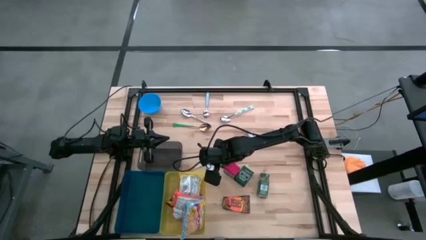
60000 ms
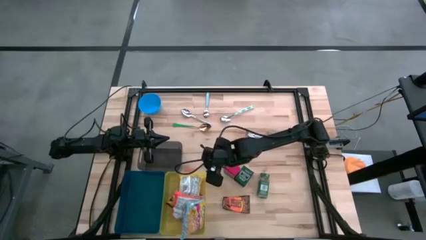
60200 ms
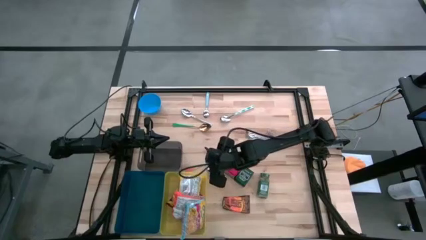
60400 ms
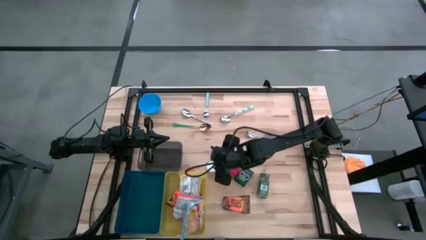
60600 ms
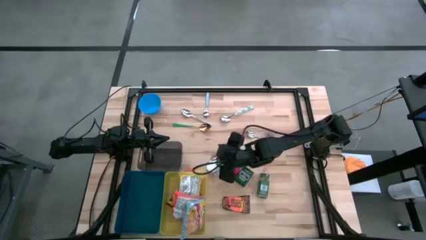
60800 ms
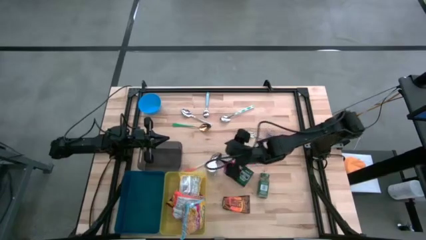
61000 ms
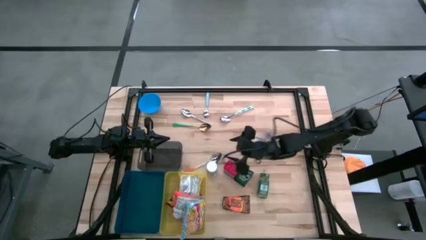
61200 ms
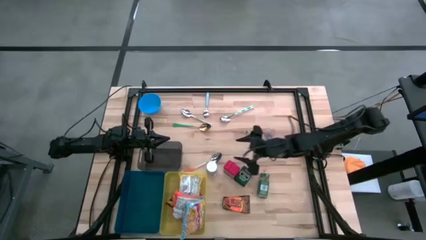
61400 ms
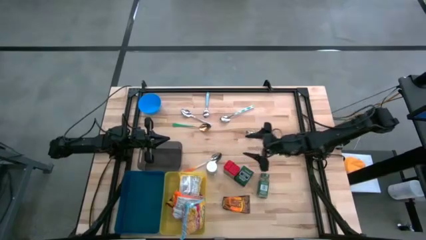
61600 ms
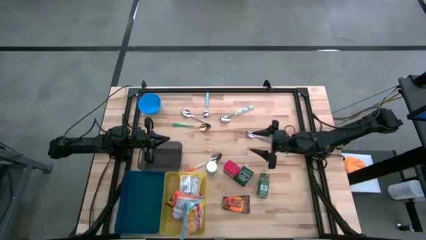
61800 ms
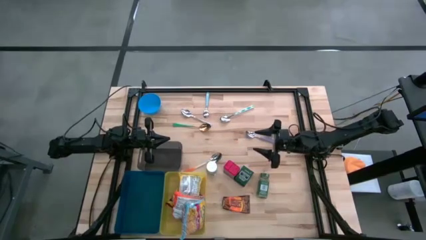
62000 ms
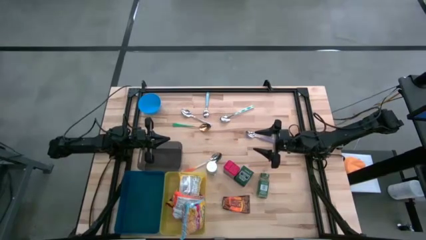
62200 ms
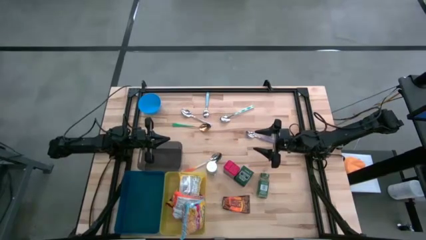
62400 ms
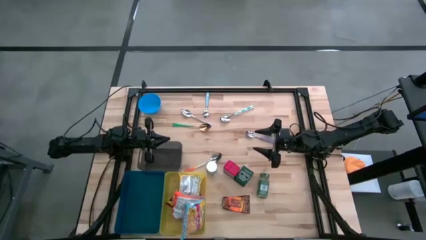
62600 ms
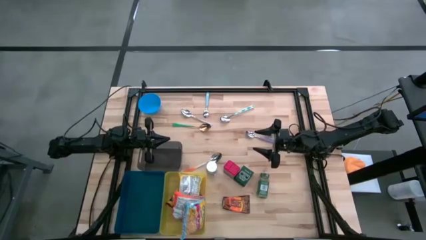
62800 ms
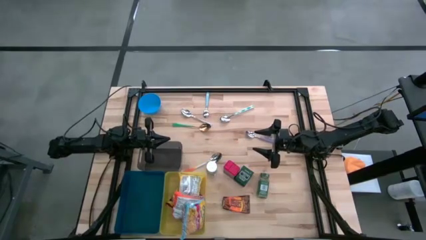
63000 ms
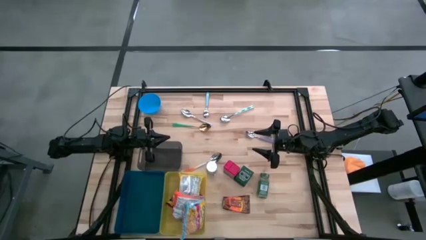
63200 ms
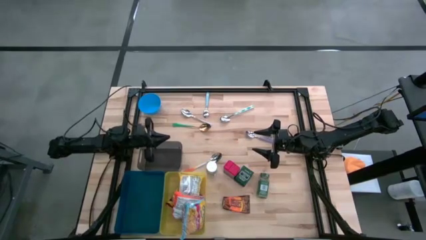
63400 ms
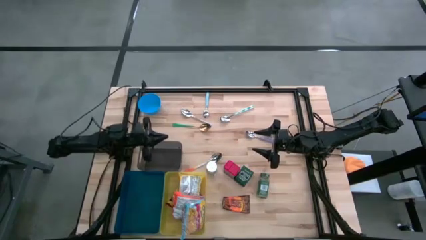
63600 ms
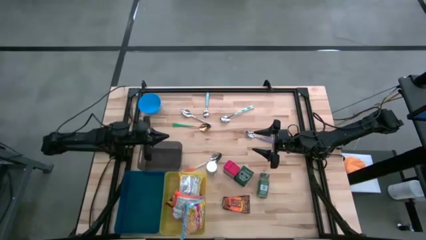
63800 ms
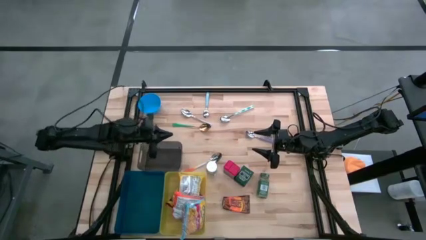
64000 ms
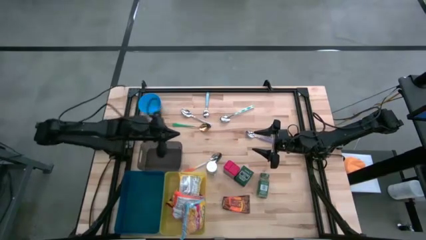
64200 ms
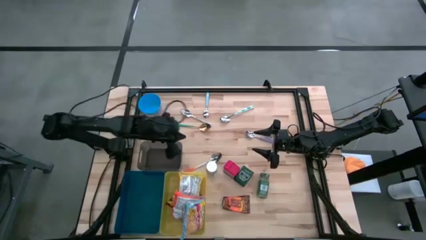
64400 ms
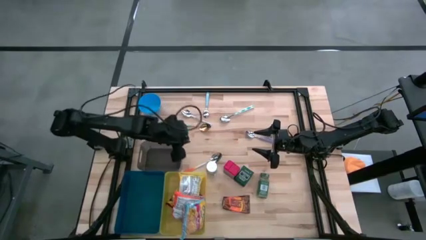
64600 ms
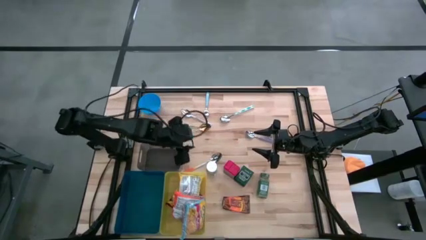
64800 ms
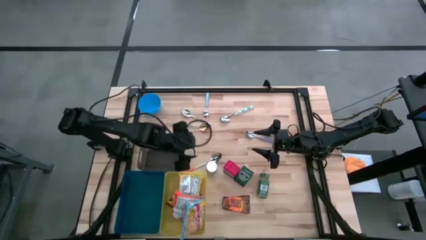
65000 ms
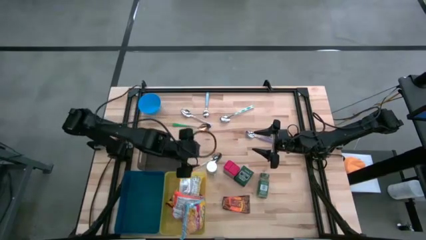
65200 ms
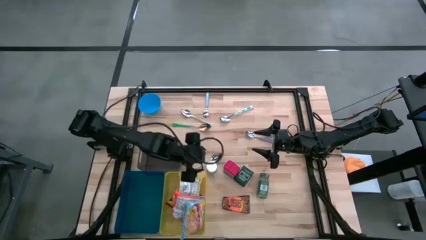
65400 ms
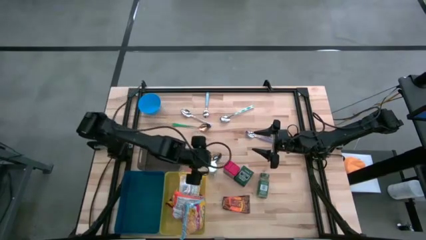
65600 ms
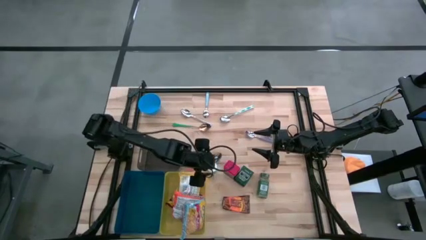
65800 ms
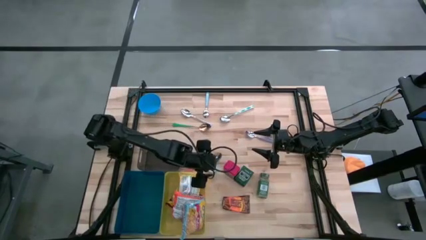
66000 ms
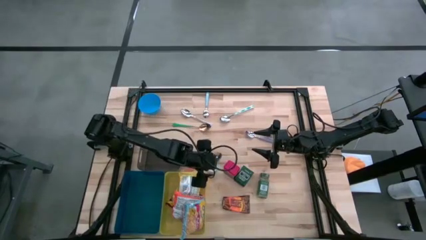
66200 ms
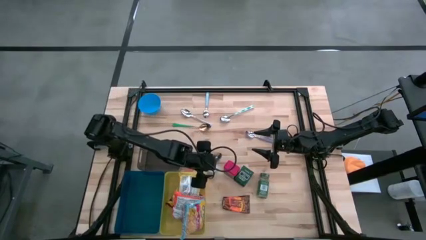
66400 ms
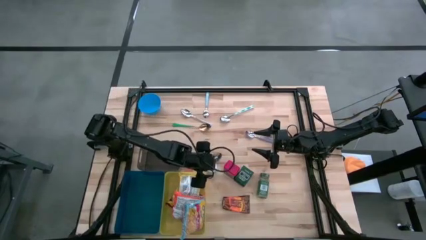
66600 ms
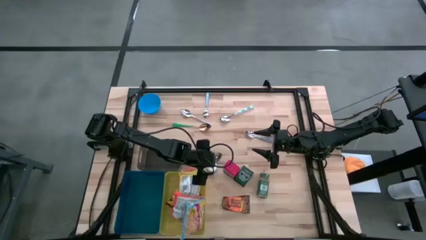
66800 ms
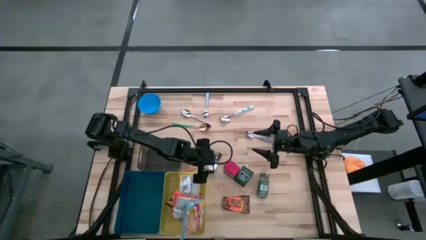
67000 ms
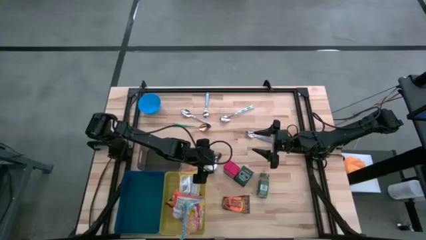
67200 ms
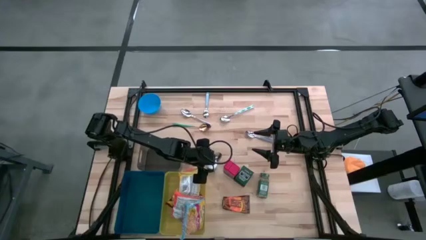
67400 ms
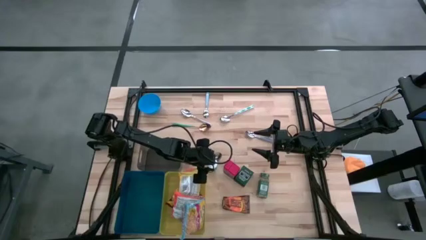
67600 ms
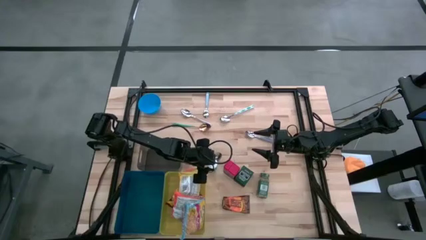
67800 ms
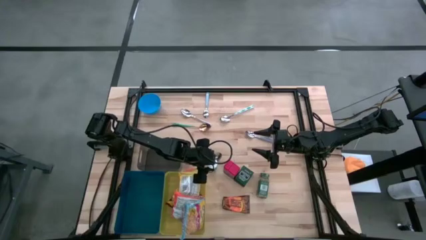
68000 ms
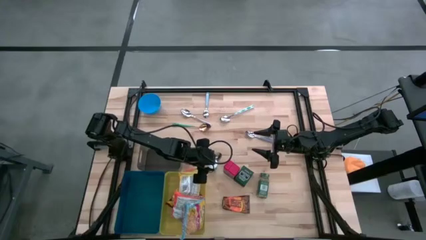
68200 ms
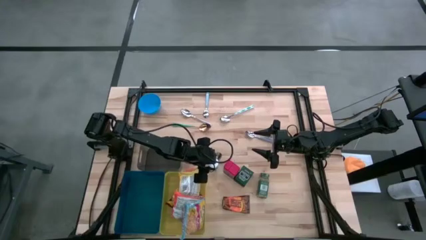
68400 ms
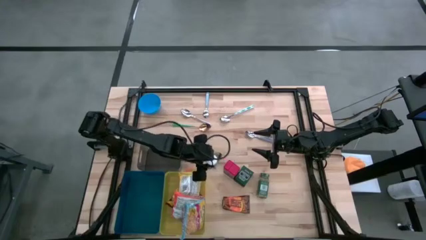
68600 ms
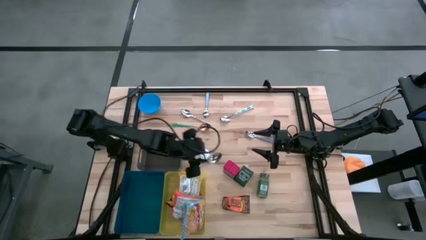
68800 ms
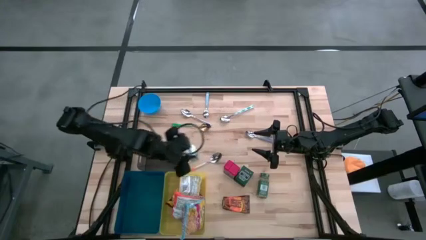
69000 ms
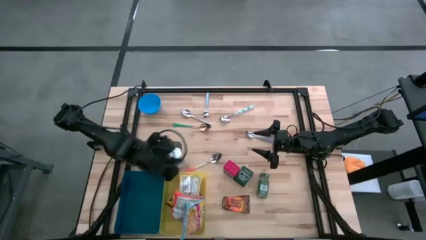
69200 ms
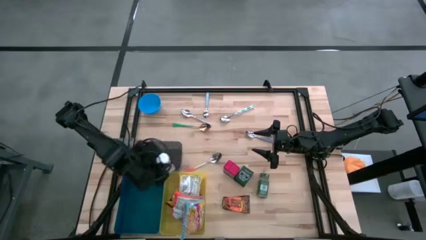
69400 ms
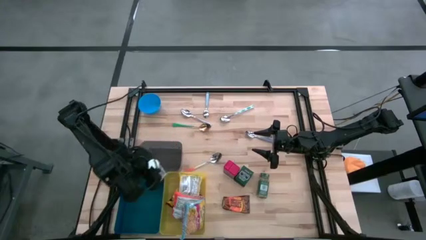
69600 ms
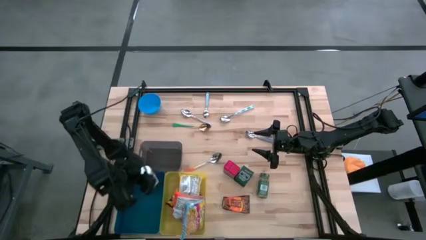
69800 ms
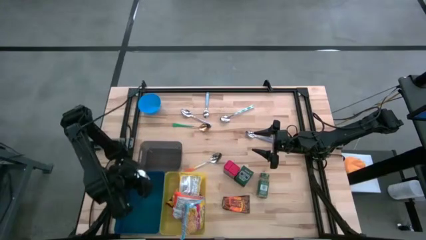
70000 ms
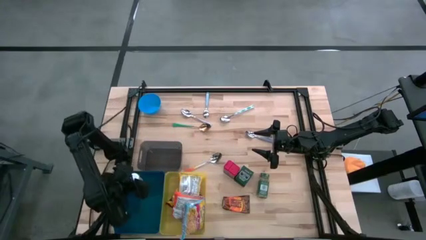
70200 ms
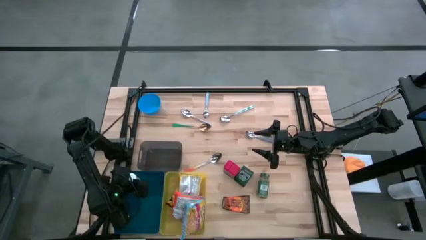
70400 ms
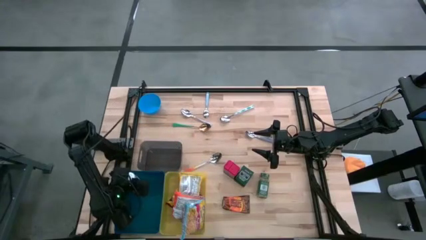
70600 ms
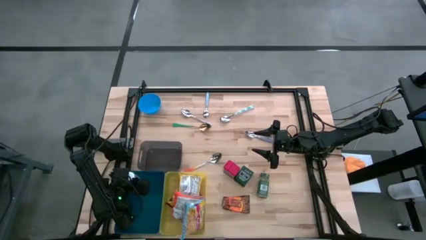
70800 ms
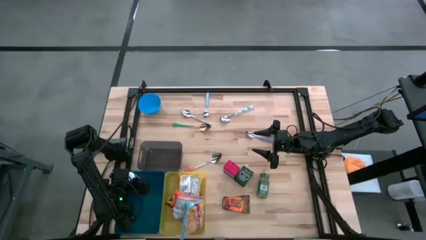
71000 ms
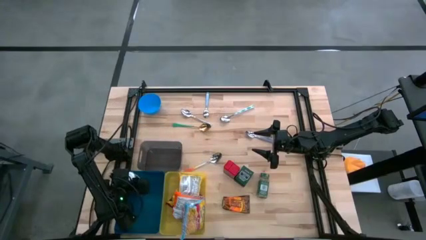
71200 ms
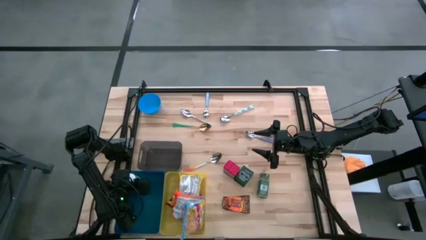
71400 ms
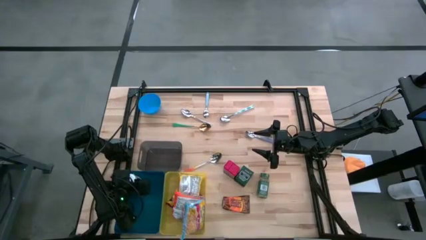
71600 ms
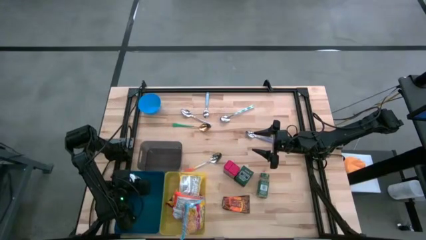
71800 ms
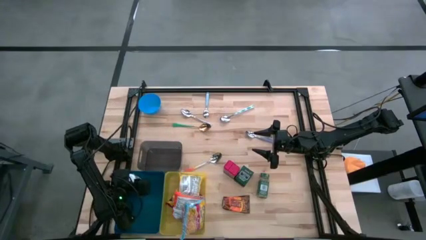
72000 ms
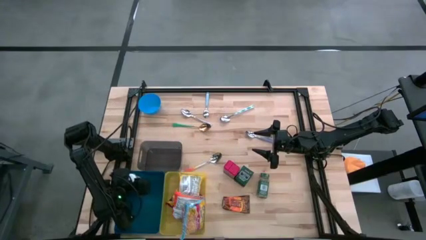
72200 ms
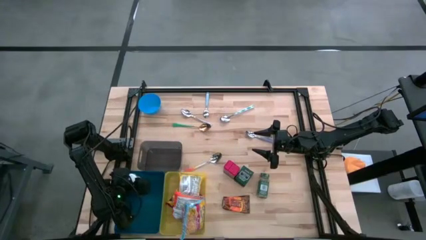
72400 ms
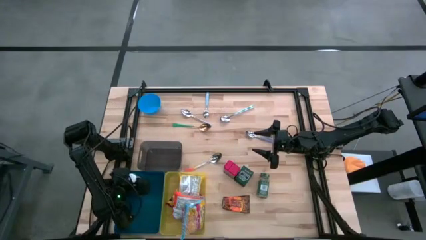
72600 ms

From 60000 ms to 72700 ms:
Put the white seasoning bottle into the blue bin

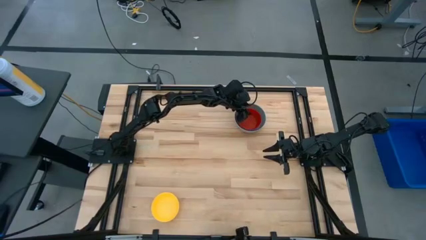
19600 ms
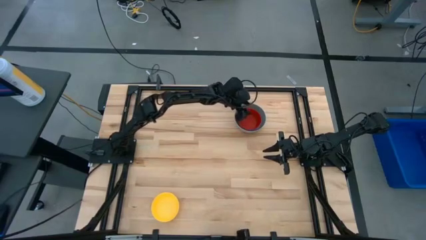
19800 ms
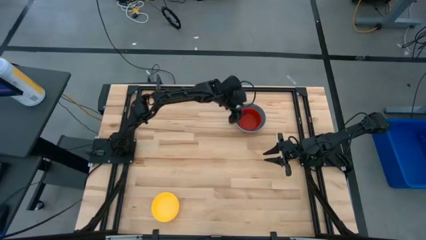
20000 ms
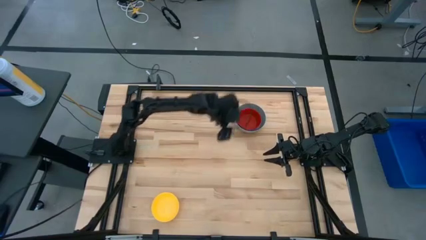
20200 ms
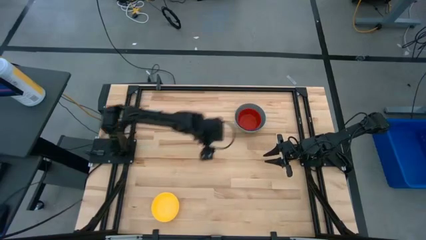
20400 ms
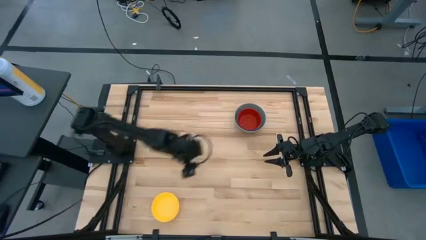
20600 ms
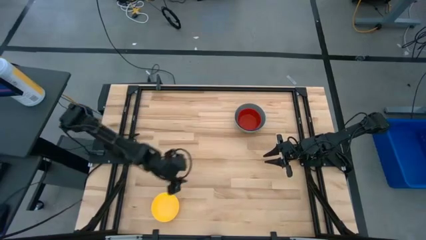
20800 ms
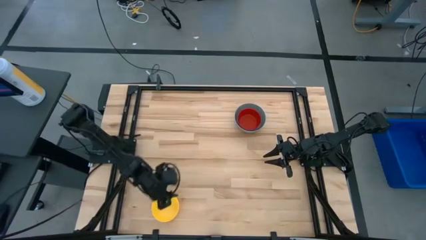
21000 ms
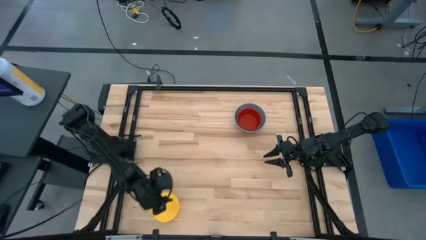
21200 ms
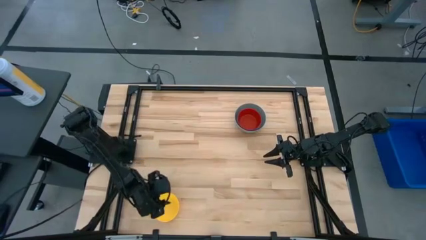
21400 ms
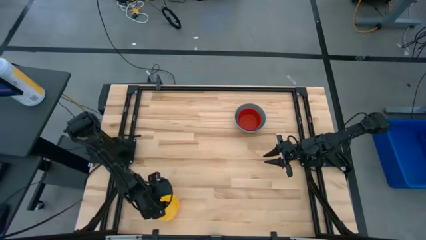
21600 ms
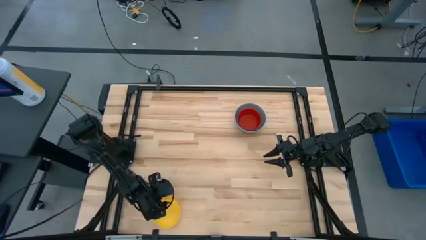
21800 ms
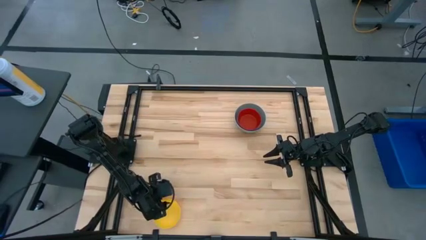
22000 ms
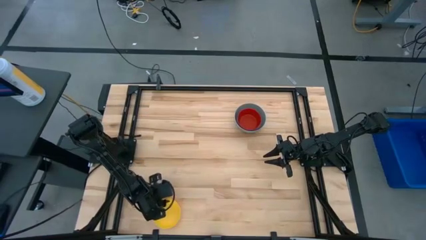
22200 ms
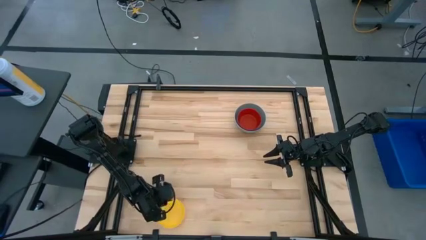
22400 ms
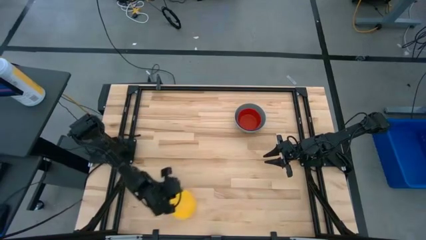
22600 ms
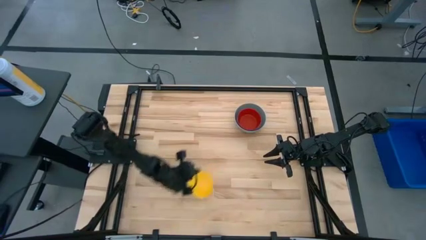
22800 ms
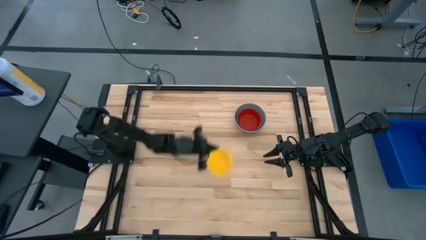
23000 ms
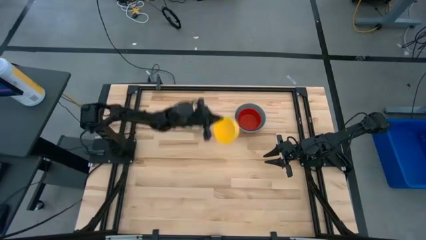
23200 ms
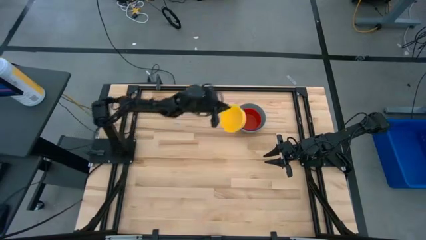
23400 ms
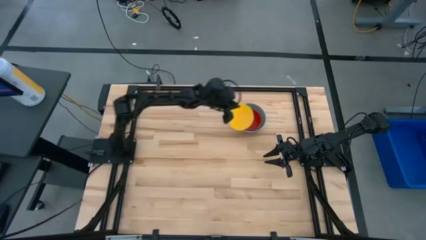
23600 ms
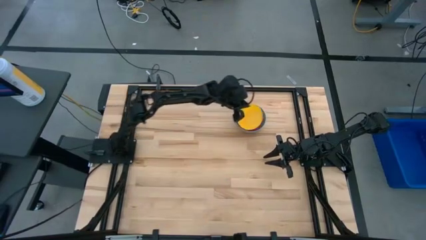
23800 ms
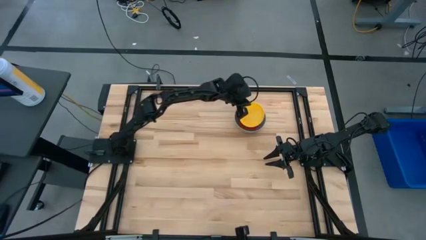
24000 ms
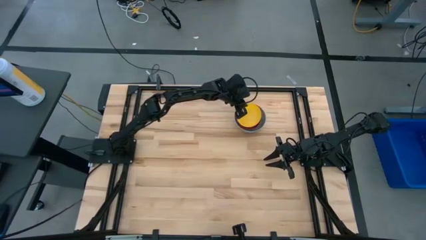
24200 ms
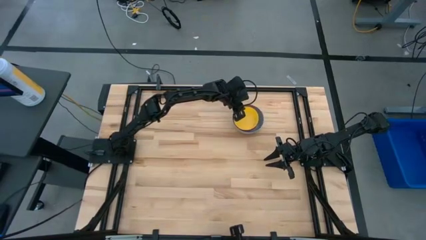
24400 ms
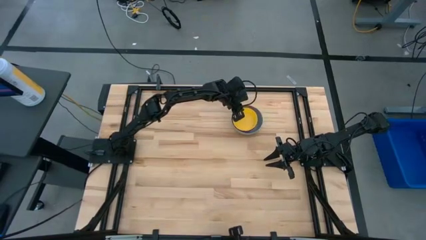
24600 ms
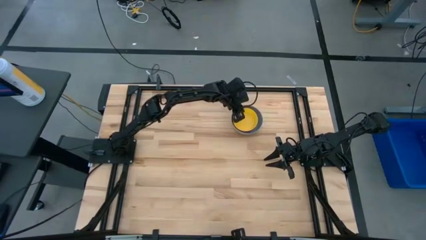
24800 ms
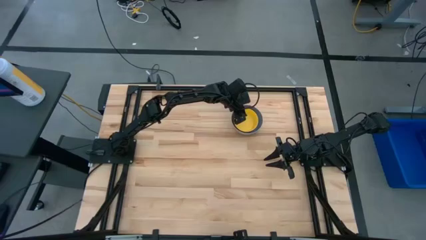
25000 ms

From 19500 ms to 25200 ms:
Stack the yellow bowl on top of the red bowl
